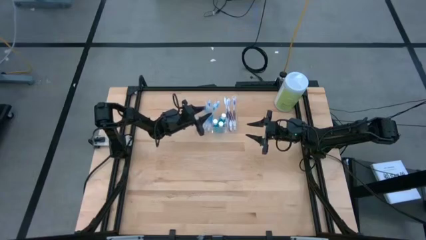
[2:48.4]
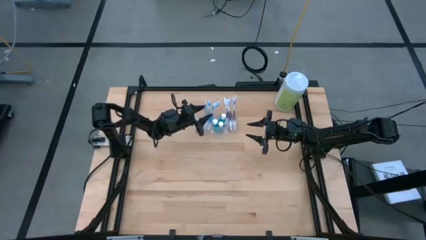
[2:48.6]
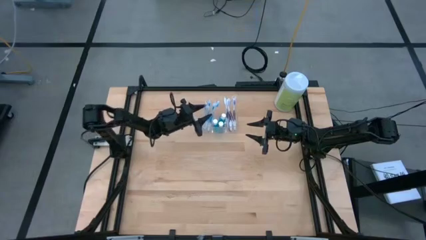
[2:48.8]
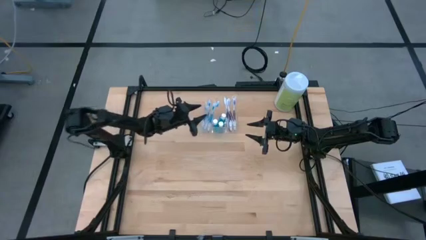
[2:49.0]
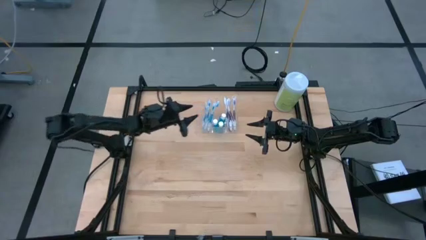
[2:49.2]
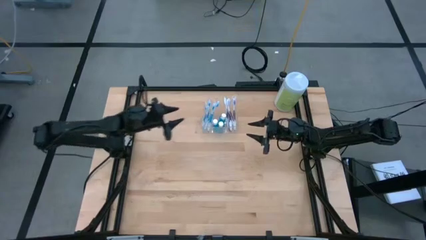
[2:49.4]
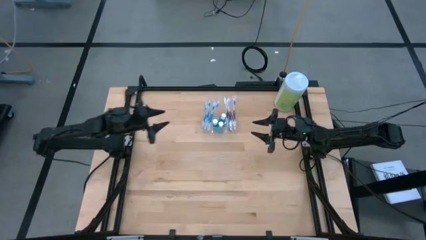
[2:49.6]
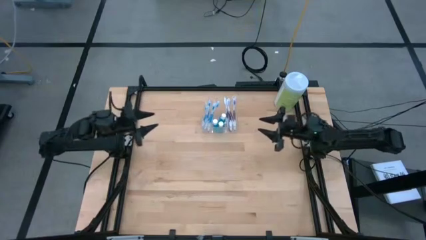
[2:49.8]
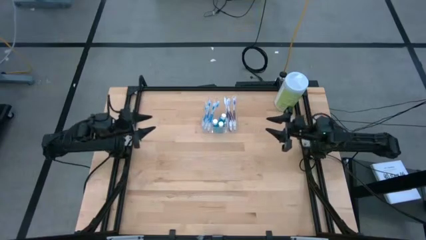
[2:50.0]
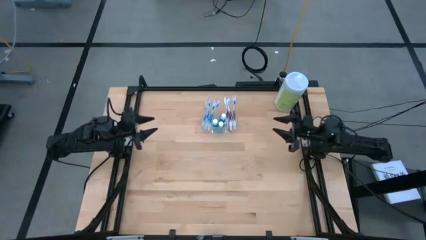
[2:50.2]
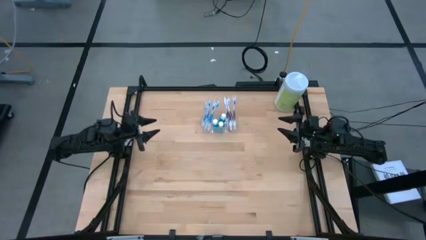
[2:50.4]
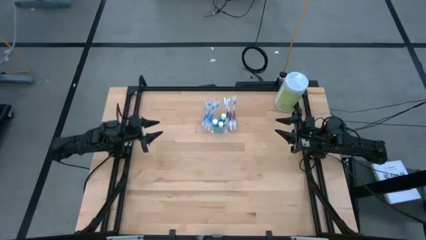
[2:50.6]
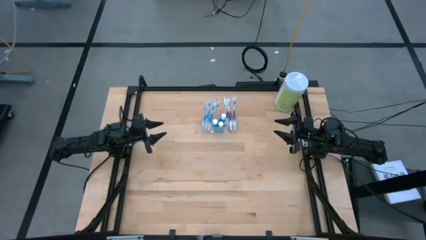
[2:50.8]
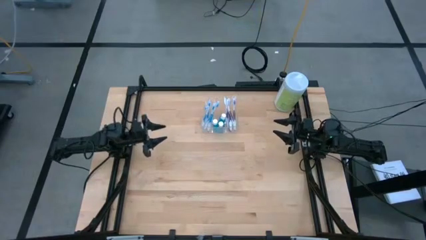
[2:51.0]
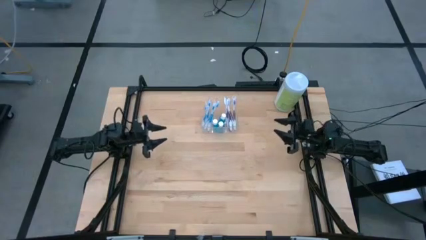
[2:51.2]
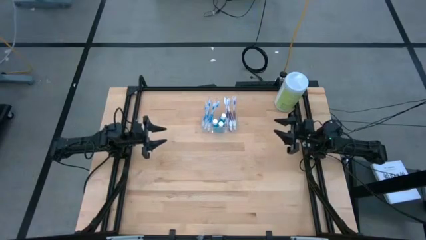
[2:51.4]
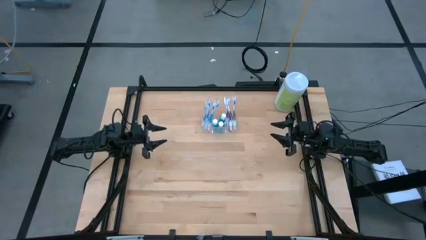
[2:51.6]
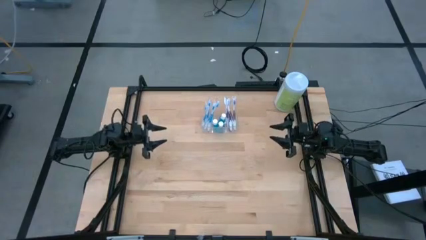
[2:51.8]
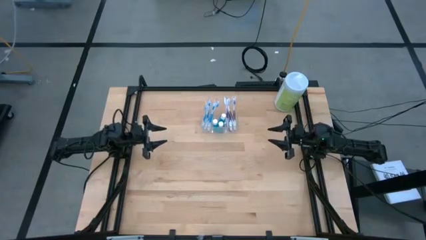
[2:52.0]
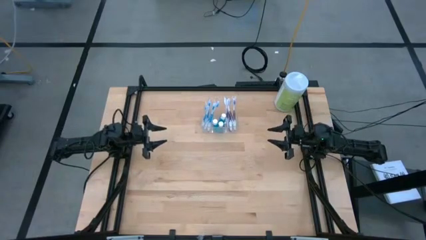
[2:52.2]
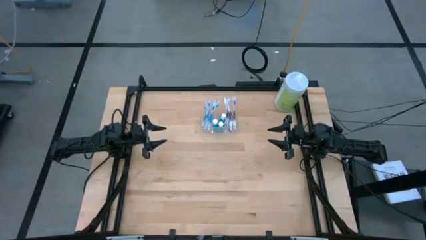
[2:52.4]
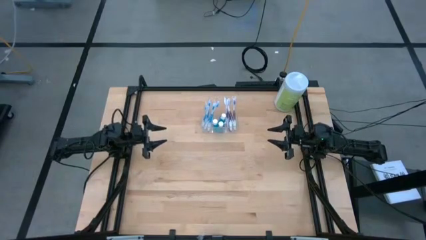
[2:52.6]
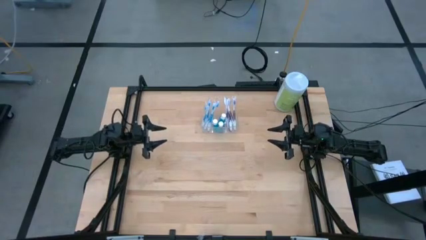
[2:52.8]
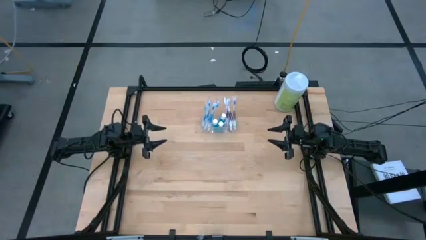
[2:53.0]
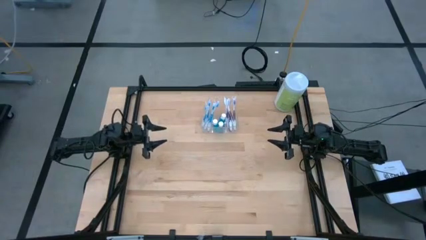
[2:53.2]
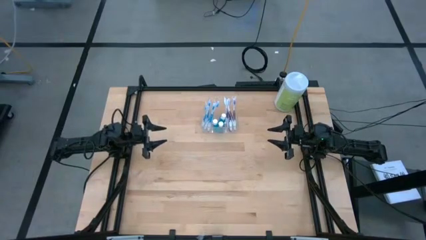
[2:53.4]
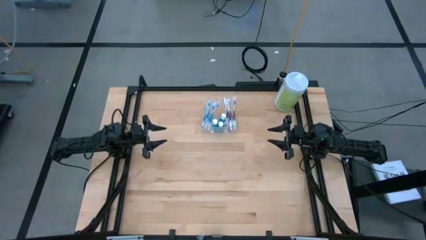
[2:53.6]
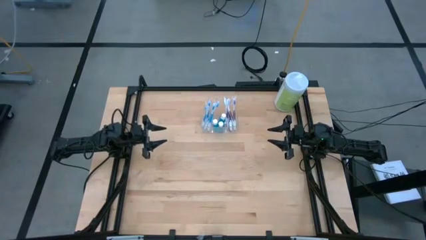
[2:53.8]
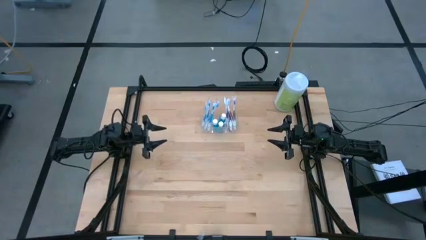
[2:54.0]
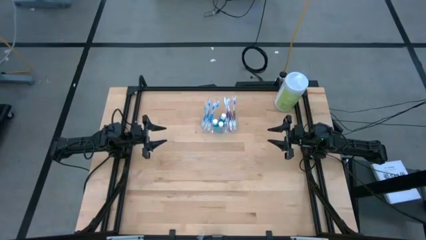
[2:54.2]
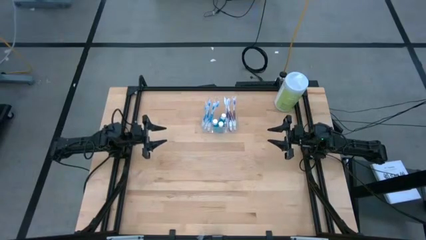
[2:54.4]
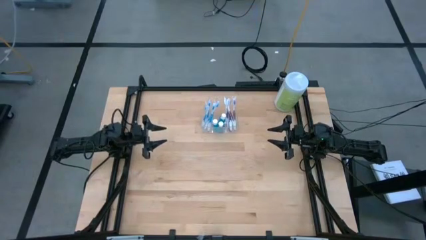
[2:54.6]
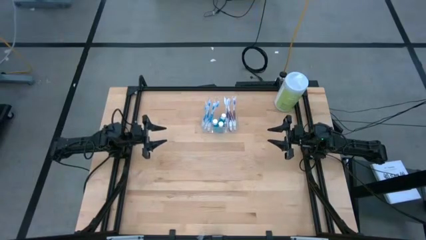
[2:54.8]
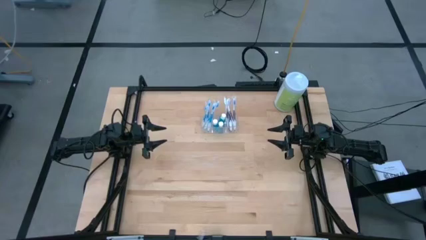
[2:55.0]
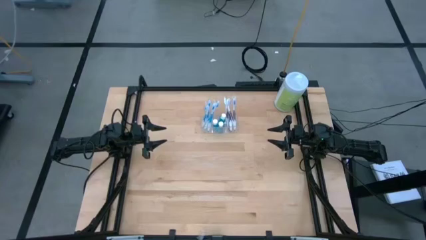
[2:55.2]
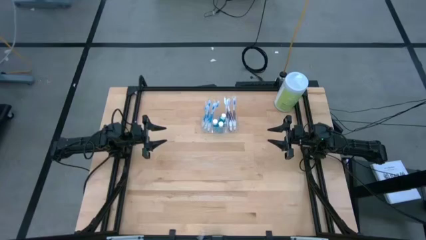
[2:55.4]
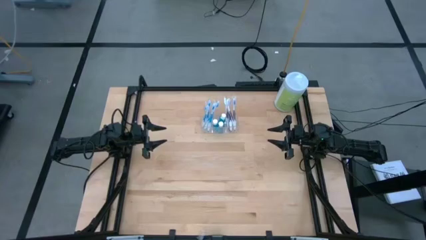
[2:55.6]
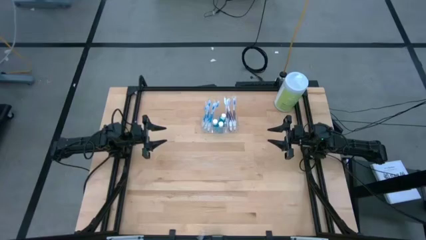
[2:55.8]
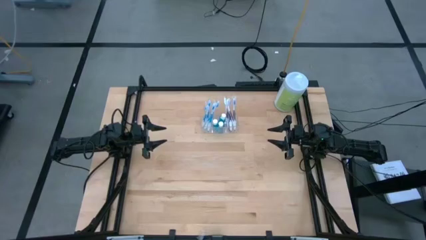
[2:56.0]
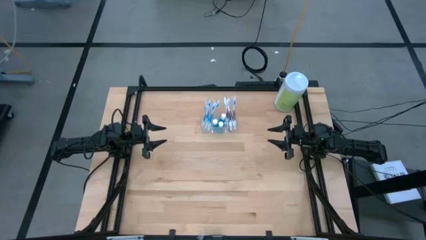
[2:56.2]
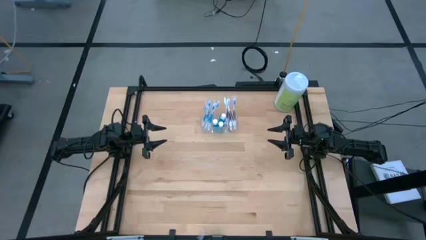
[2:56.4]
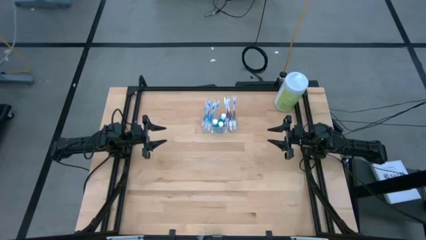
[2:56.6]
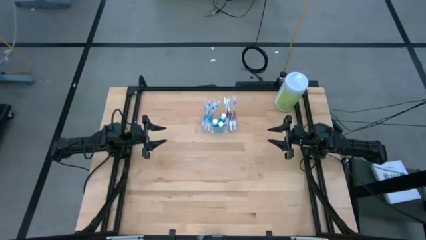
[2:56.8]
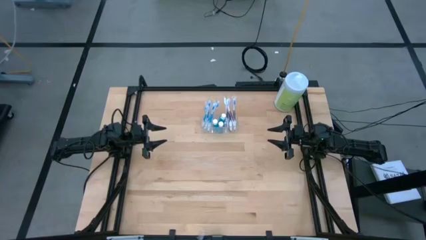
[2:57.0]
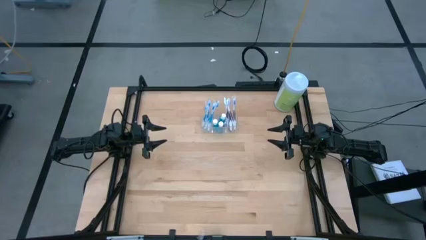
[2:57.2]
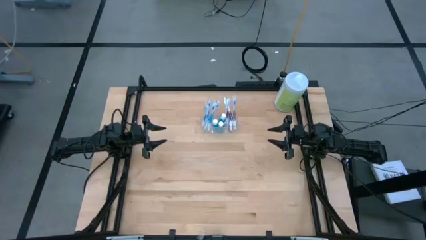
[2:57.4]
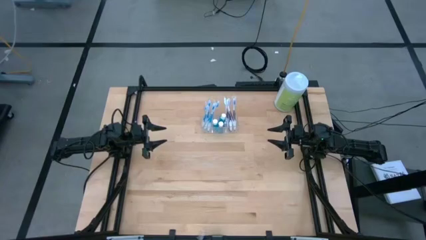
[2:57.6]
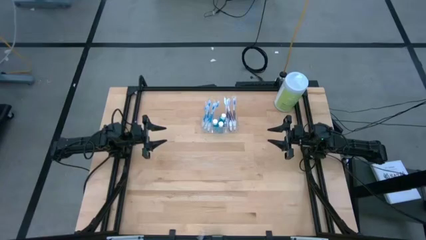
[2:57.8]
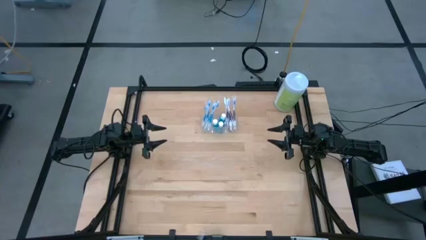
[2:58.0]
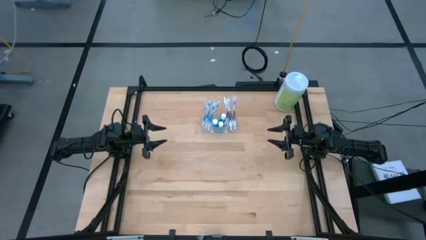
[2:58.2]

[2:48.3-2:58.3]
Task: Pick & Place toothbrushing station
Return to Home Position

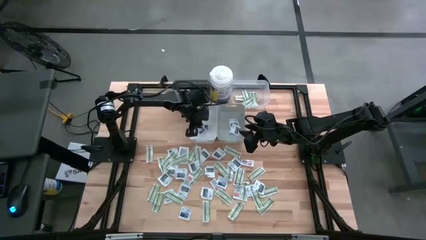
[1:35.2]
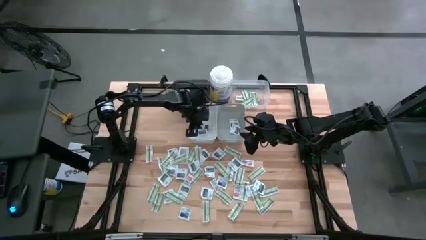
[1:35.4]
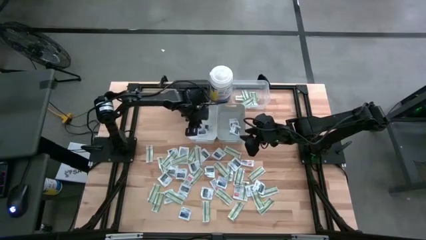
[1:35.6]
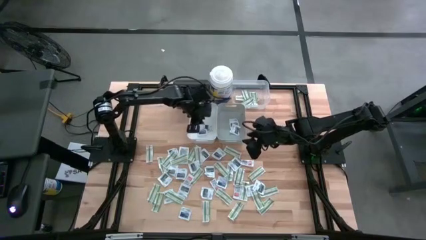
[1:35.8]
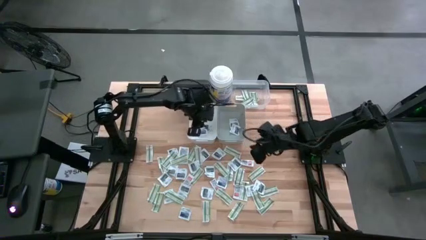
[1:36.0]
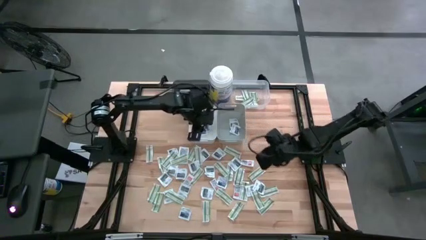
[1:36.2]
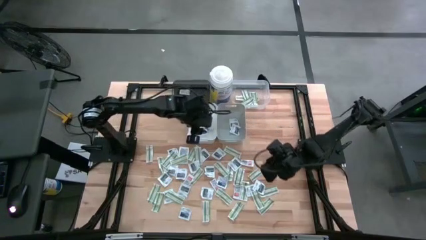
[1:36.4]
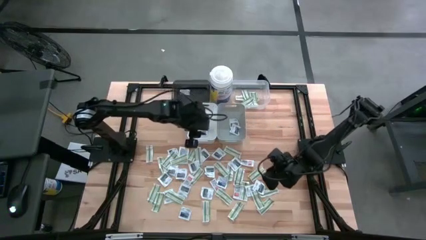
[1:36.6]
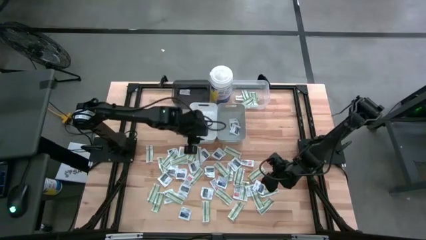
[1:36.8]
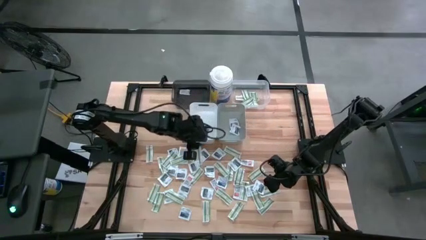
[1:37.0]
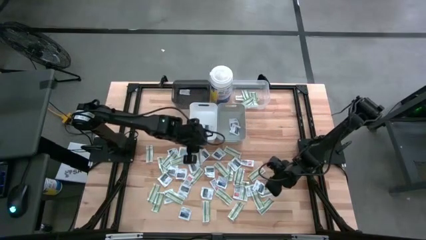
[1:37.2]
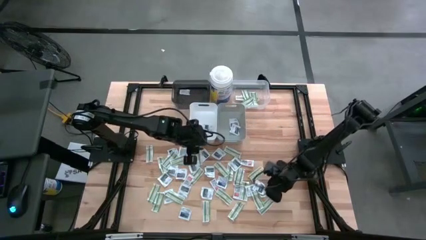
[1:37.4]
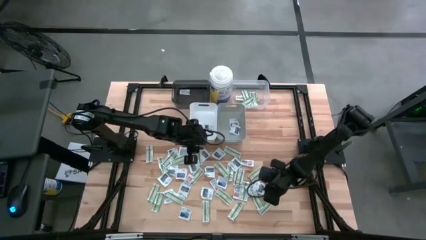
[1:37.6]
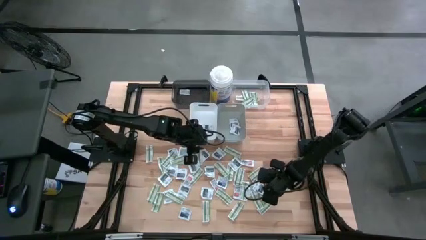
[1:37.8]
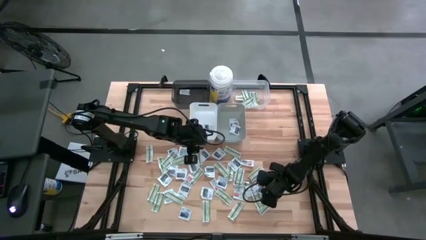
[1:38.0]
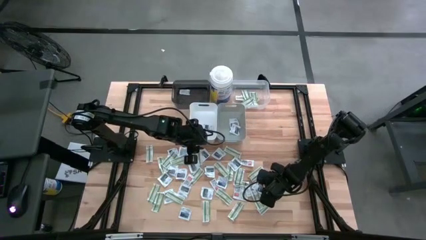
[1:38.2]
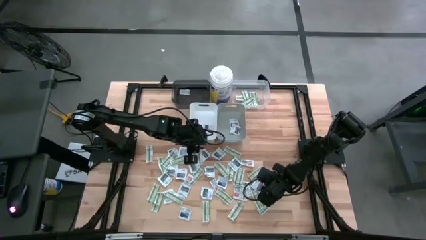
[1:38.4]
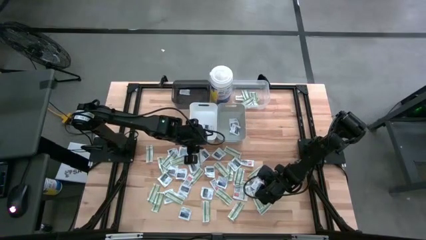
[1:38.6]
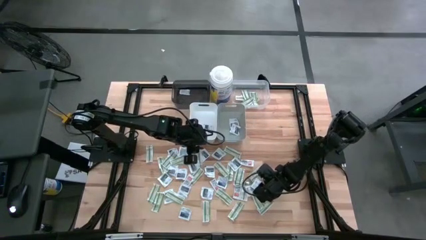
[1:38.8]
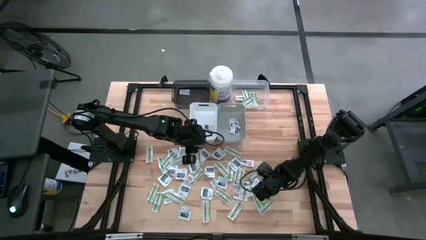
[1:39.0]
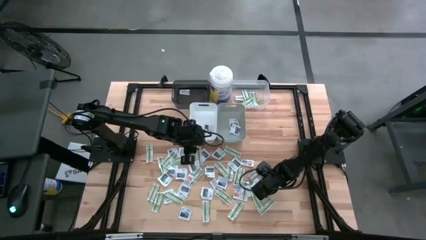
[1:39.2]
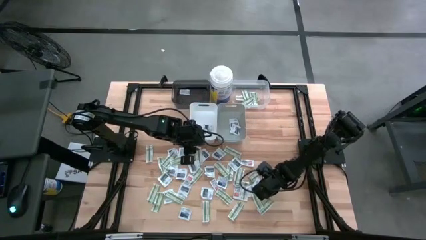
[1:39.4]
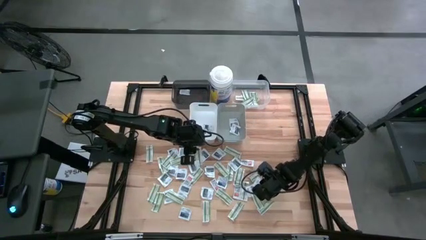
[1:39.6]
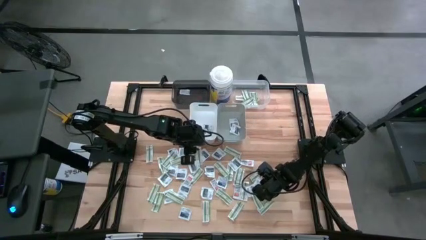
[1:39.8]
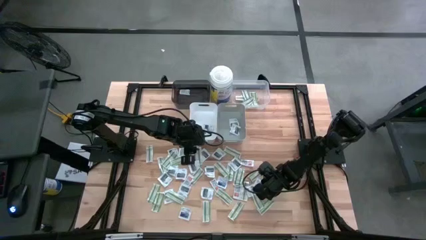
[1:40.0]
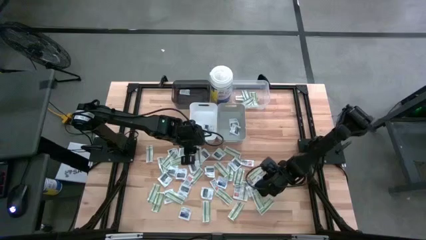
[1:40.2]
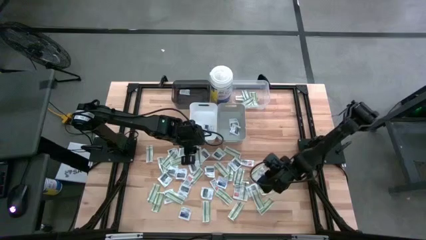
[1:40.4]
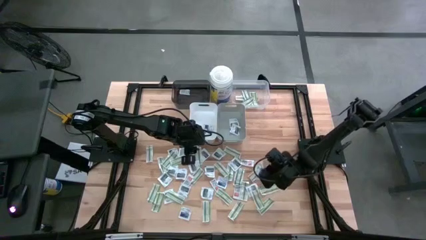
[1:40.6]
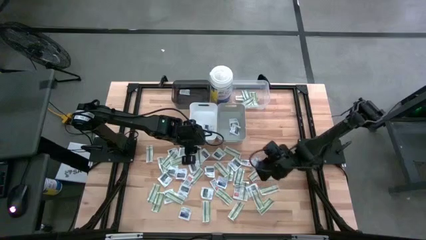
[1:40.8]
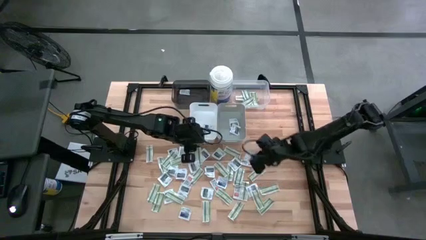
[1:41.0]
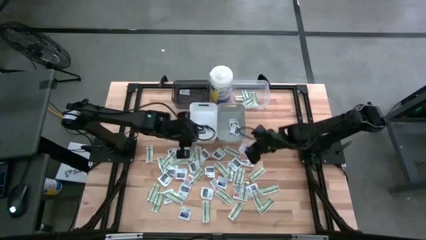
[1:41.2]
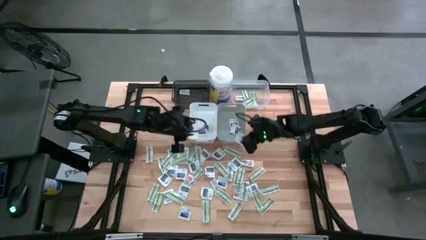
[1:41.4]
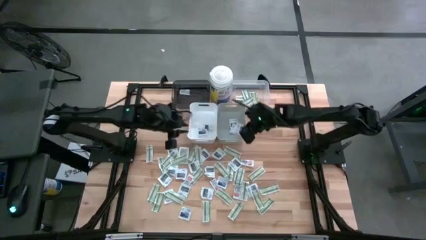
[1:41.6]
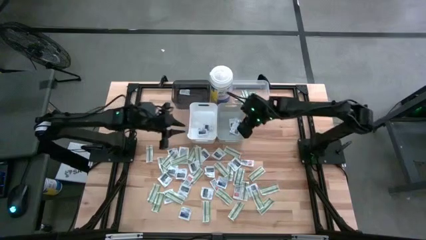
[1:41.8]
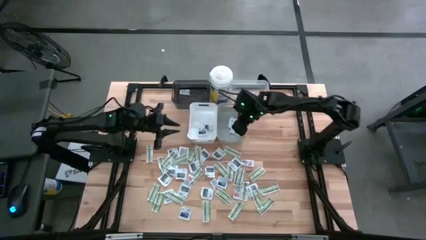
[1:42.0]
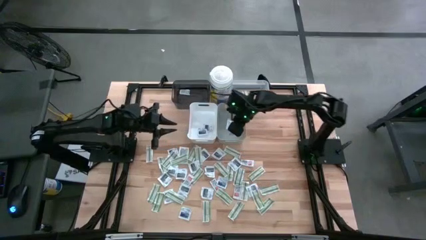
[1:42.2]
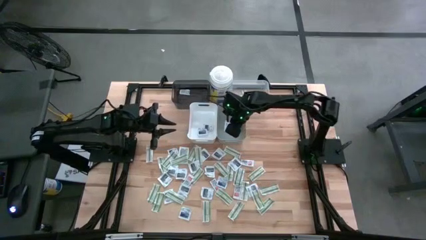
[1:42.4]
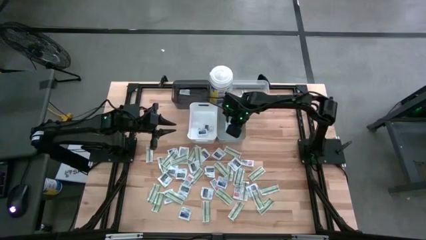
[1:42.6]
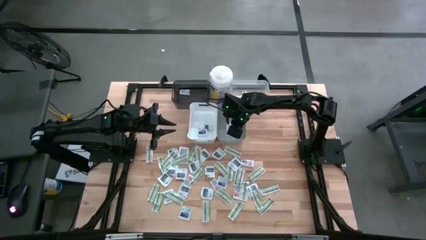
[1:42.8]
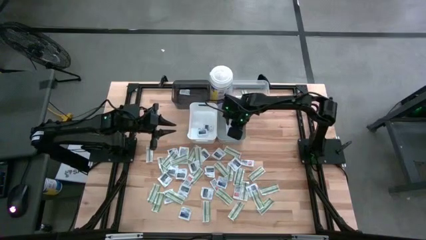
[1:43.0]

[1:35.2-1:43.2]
Task: Pick & Place First Aid Supplies
Put the wipe into the gray bin
